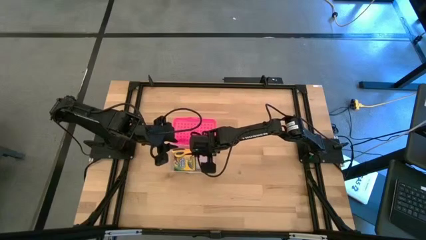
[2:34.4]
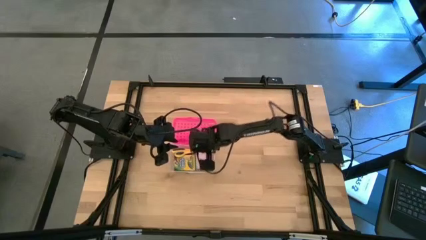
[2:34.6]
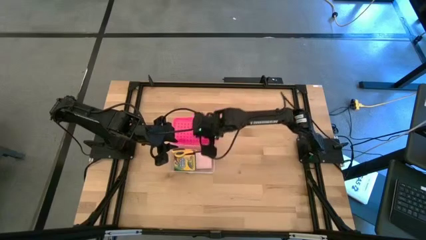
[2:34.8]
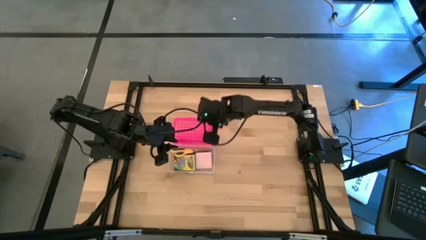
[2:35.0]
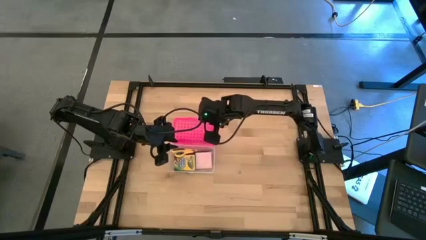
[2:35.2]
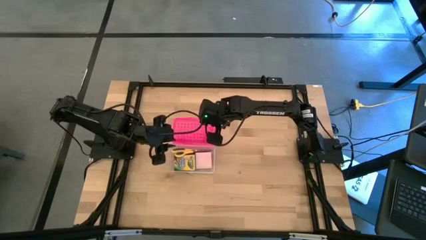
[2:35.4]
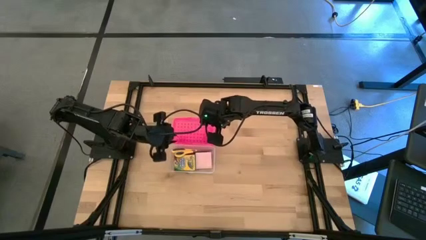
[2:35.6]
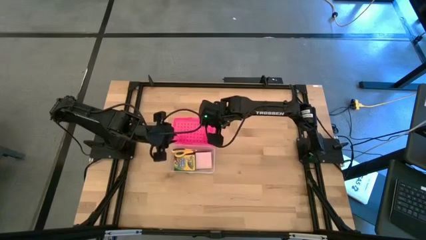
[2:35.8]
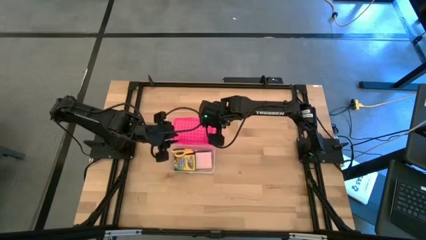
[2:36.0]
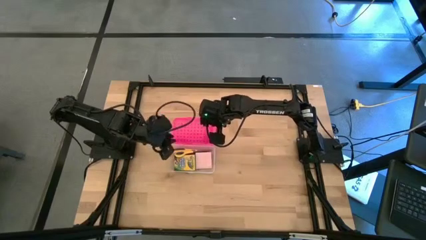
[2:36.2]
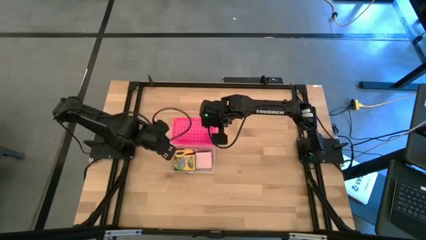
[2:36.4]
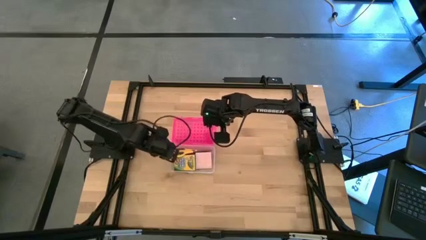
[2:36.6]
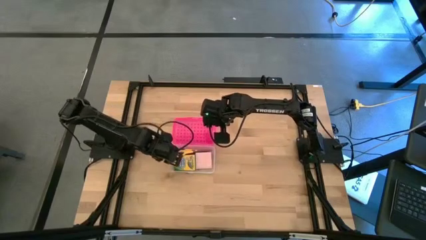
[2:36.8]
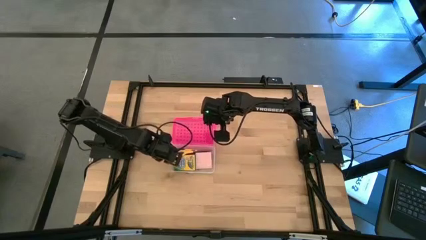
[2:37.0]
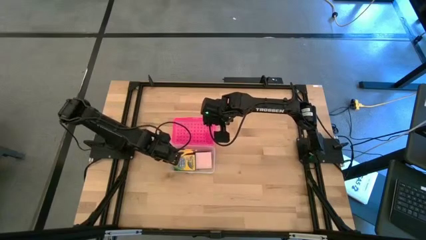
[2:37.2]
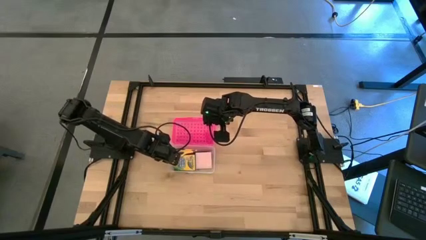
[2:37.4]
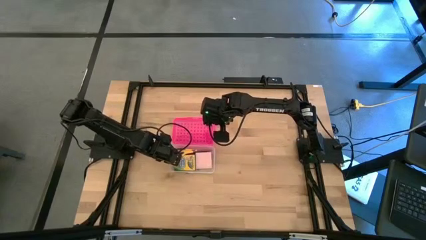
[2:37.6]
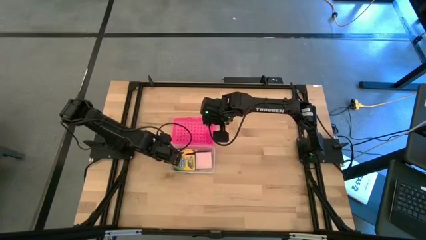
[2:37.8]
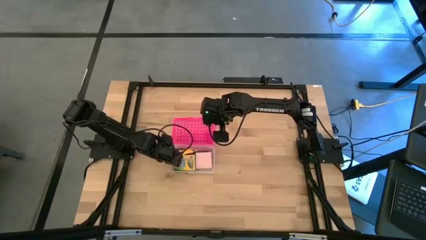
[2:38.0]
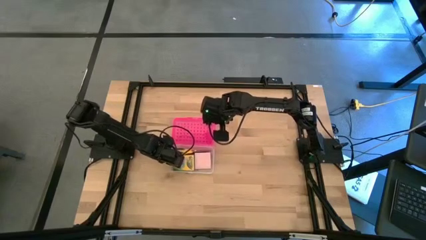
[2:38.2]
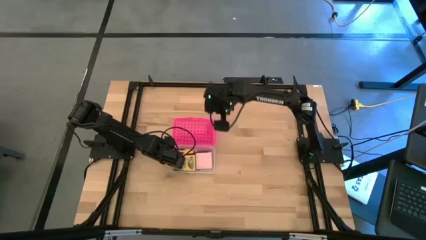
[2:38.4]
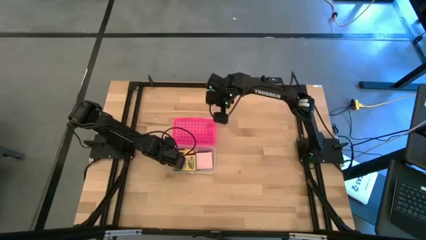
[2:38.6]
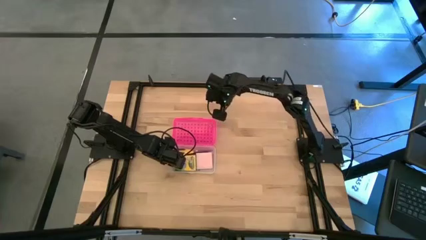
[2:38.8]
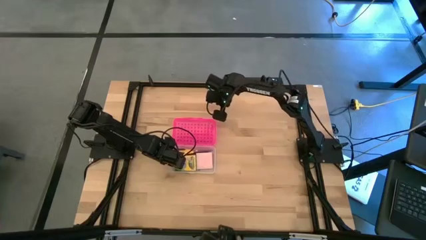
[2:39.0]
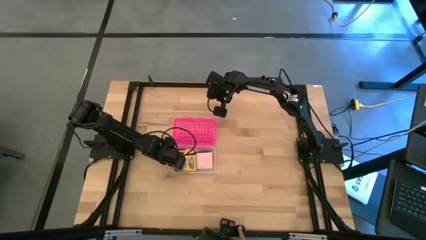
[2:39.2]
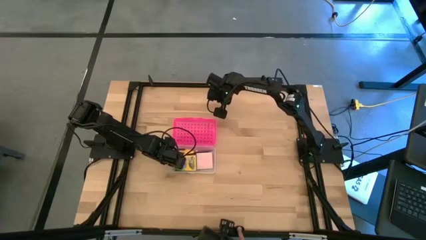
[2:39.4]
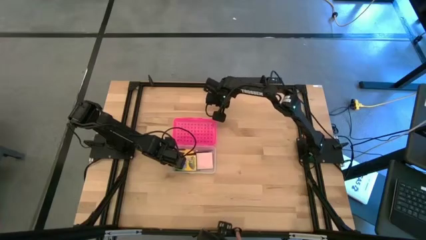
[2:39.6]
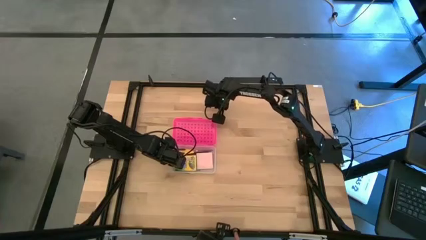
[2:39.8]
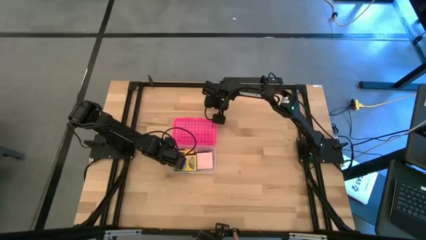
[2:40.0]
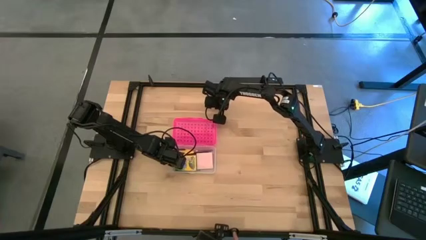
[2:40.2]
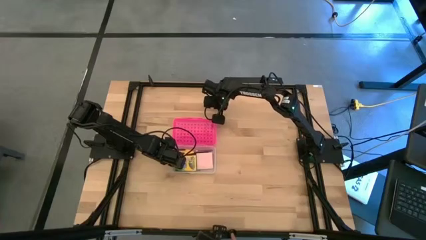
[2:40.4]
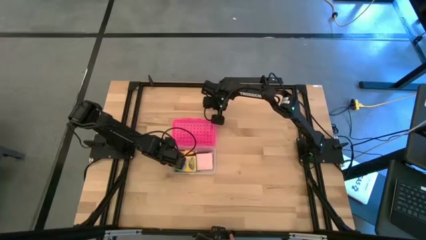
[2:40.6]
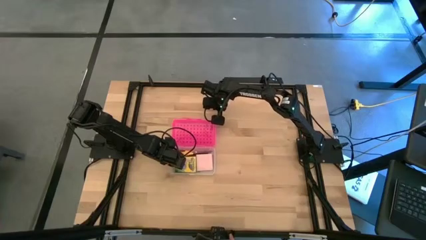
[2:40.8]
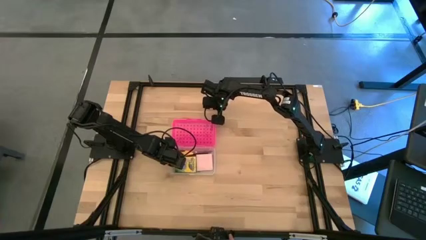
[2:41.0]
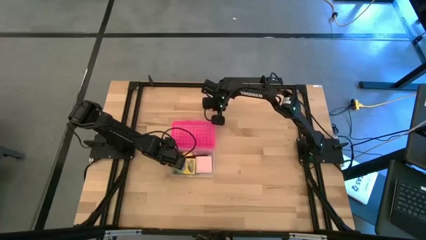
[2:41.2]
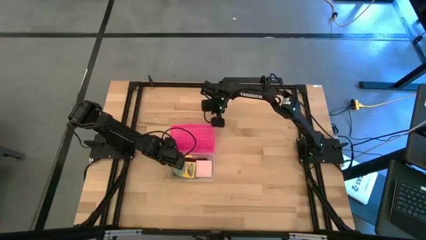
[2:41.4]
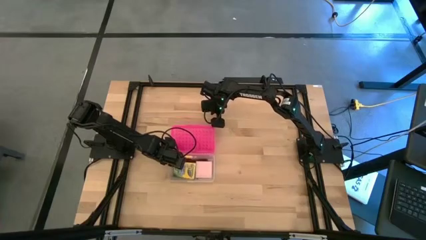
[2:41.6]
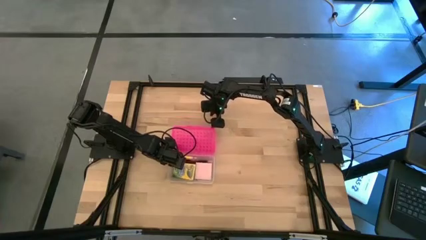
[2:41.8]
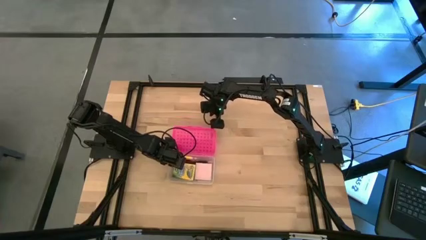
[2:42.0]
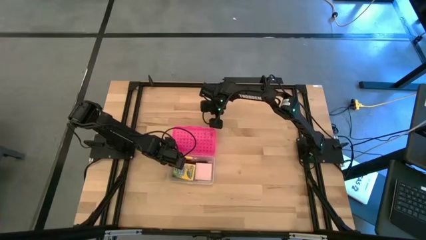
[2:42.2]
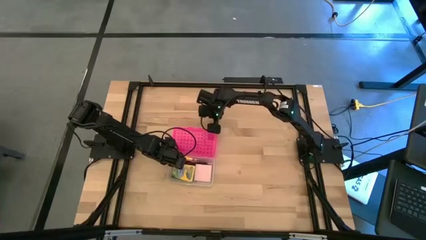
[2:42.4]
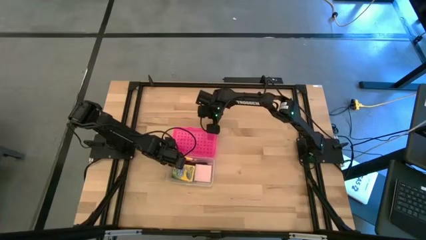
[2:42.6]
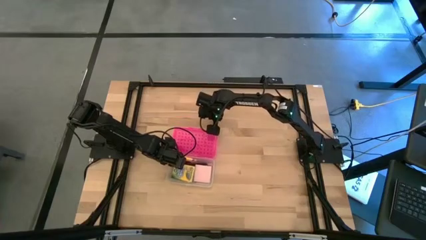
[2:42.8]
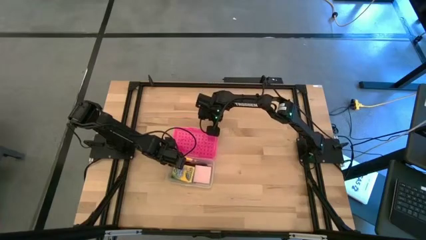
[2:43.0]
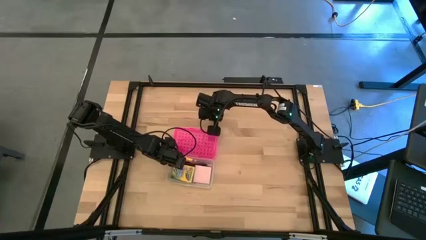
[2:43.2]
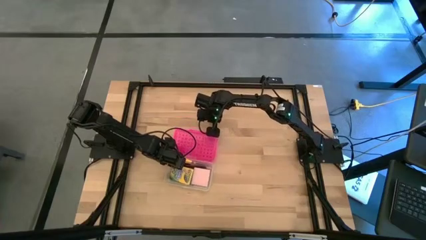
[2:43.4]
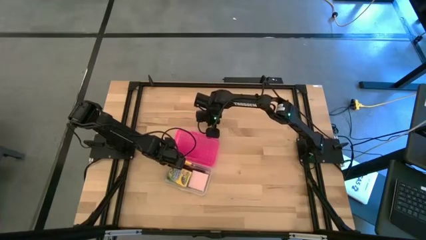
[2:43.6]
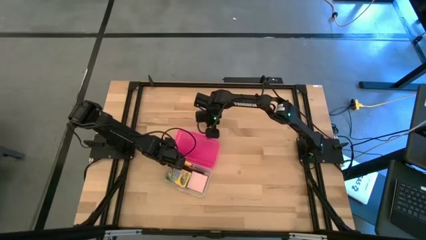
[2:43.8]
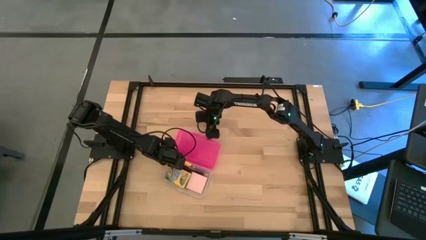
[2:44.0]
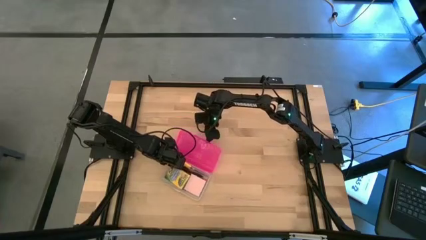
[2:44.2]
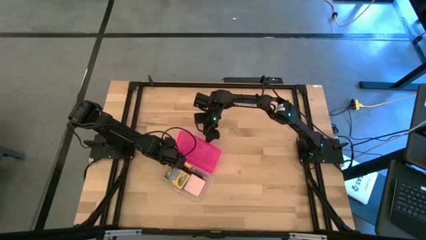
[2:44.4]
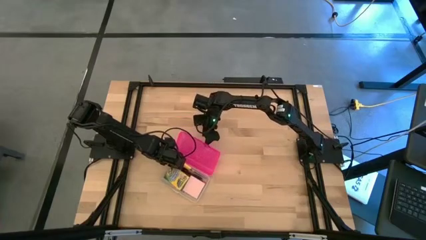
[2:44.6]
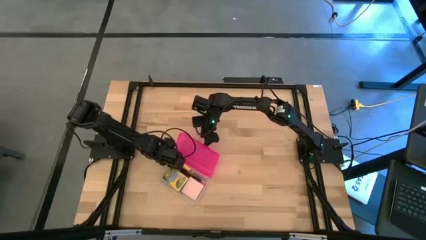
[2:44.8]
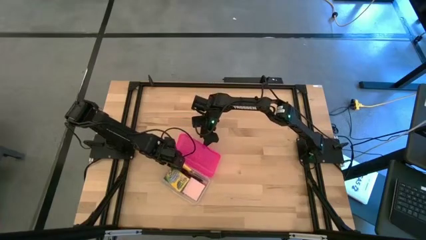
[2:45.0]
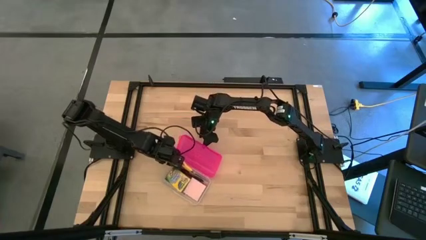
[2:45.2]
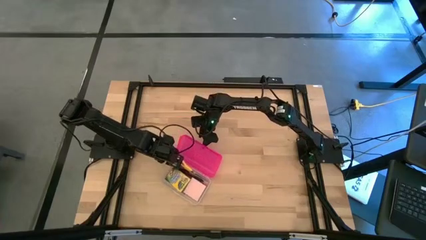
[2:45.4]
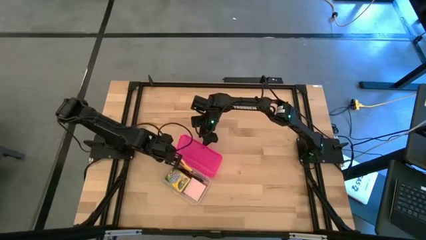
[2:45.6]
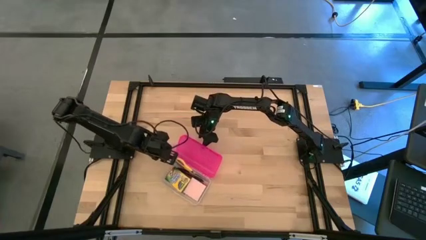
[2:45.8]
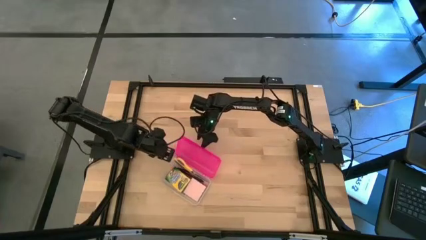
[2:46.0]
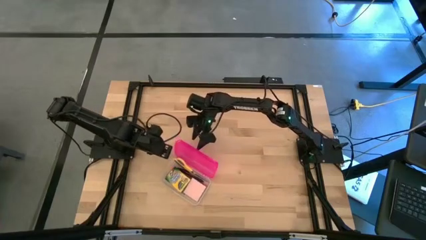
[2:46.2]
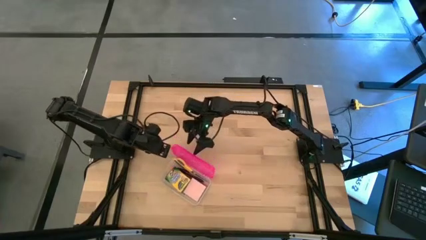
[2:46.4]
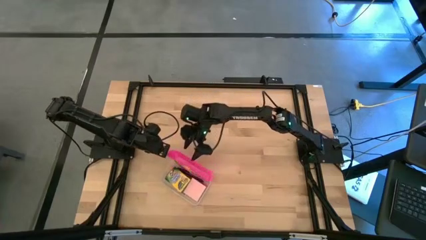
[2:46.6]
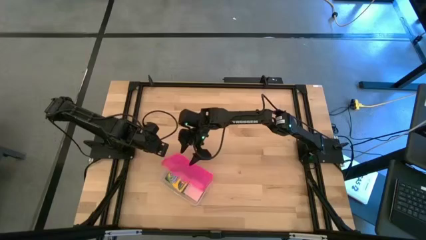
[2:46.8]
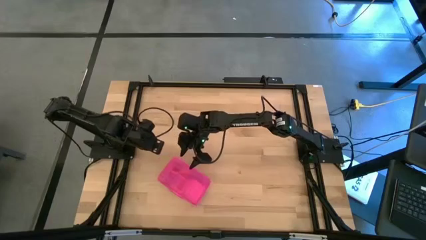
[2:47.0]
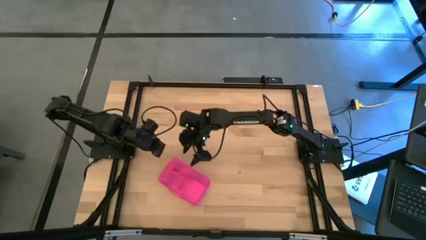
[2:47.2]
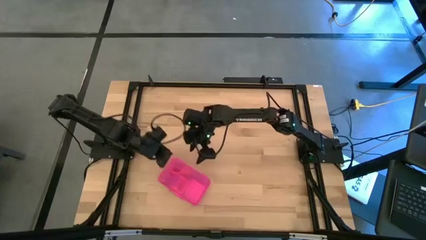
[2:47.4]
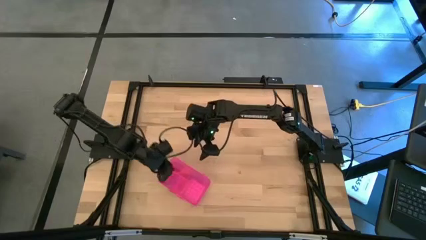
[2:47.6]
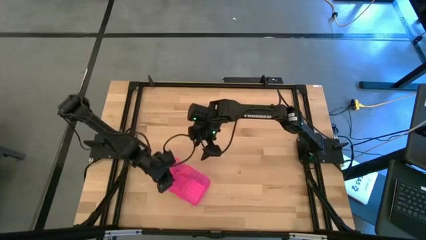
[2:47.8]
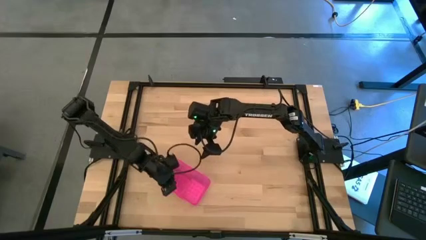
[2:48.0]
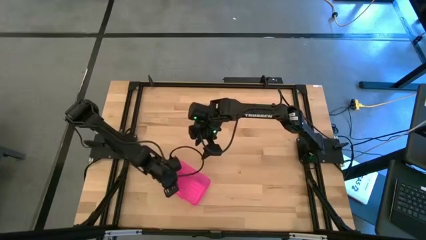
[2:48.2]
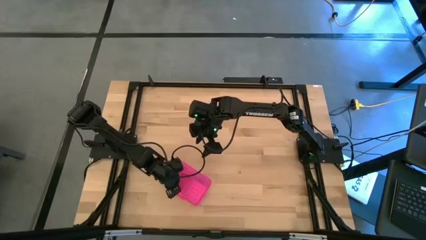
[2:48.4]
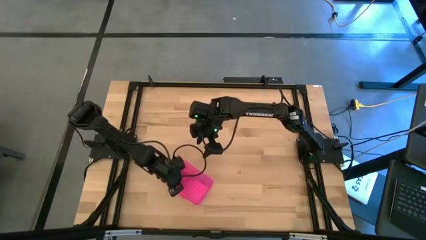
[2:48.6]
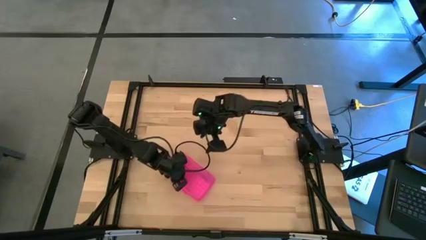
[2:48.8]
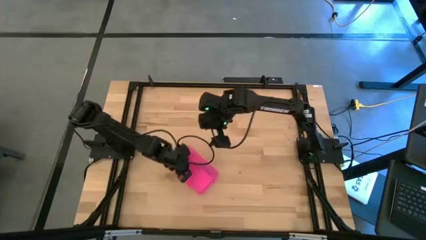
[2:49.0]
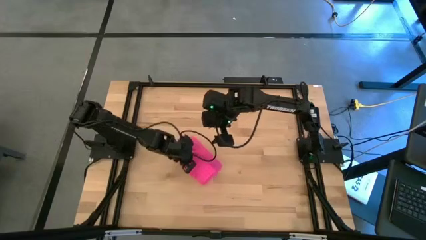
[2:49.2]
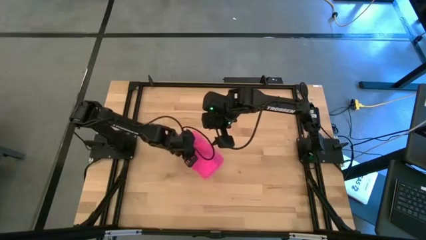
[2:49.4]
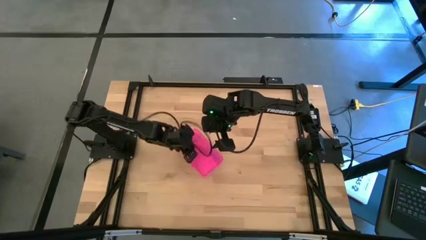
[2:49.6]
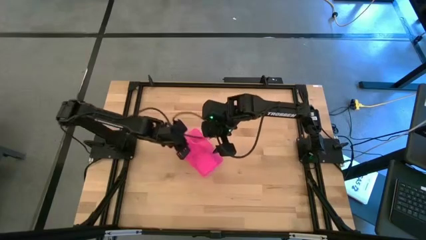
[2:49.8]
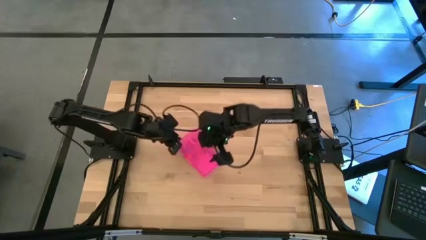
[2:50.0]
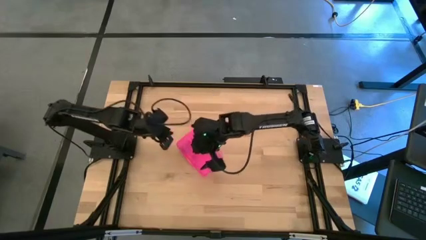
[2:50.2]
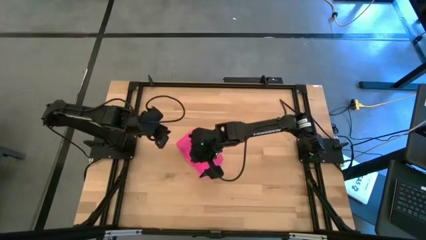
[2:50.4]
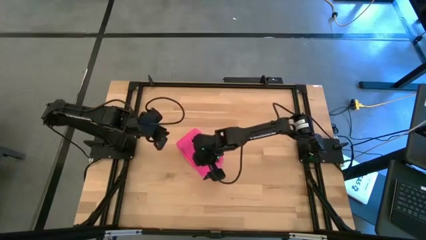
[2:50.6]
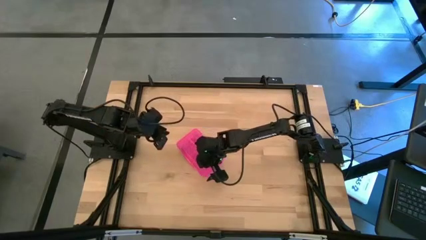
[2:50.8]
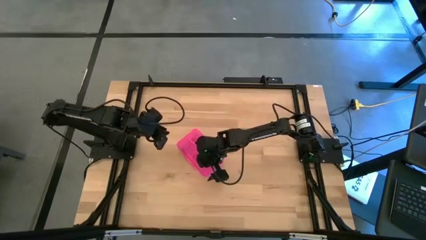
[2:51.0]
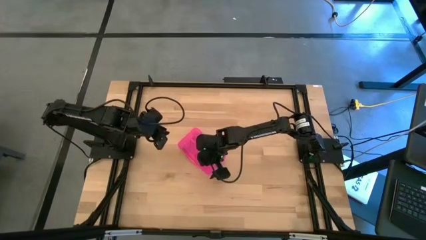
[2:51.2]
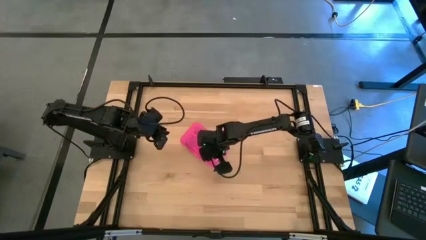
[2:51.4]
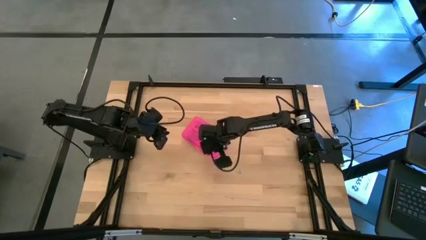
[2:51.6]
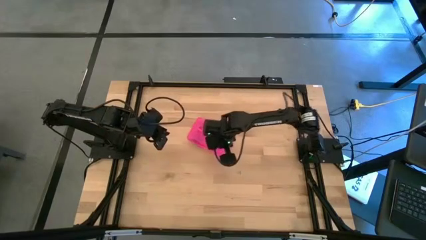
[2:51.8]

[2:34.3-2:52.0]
Task: Pack school essentials
Close the pink supply box
